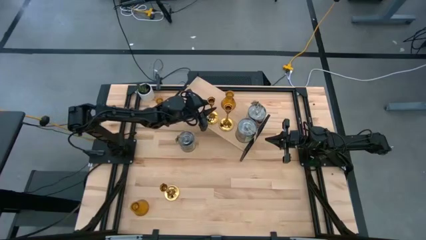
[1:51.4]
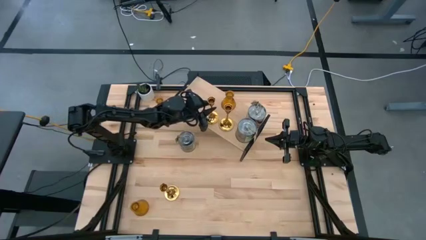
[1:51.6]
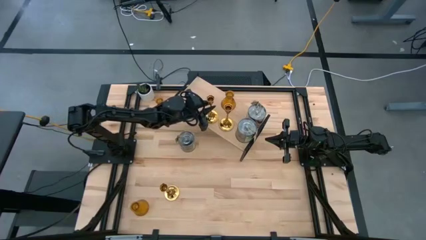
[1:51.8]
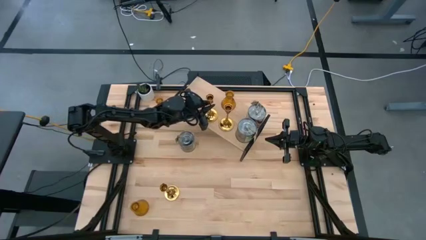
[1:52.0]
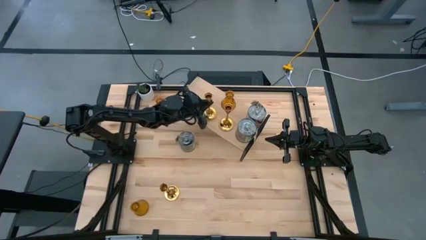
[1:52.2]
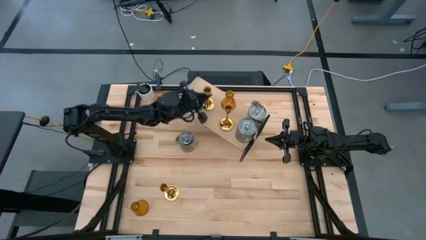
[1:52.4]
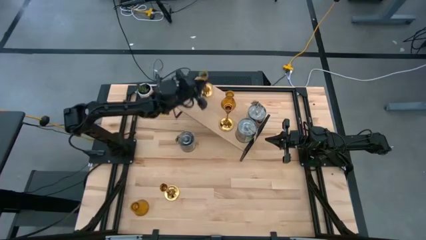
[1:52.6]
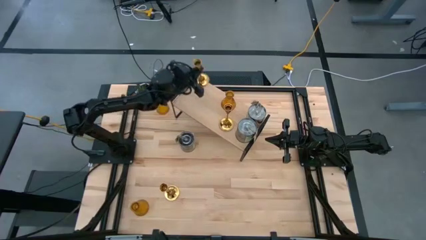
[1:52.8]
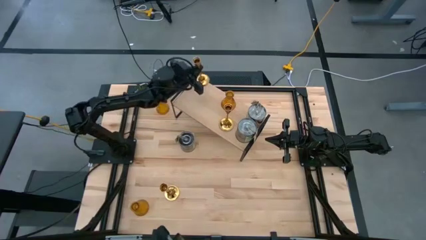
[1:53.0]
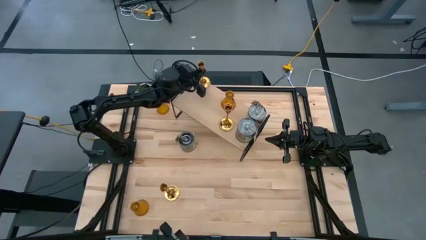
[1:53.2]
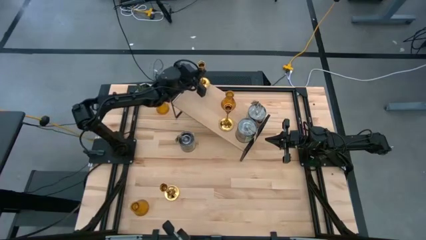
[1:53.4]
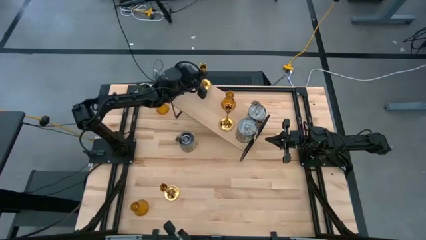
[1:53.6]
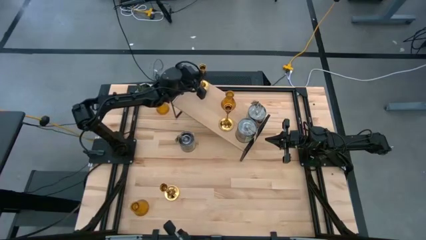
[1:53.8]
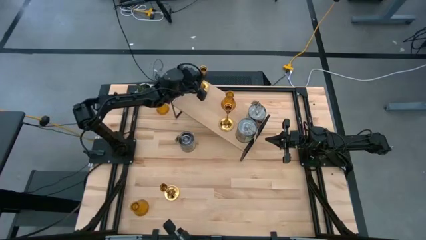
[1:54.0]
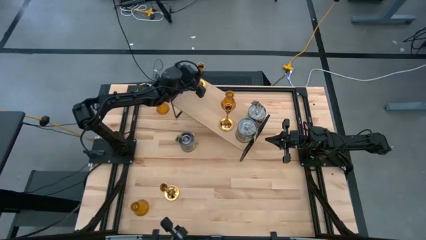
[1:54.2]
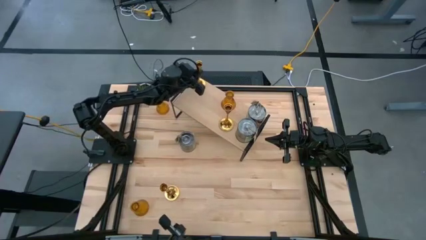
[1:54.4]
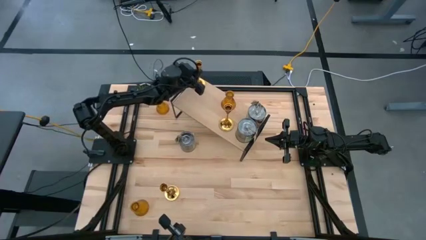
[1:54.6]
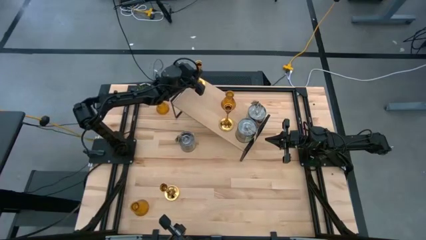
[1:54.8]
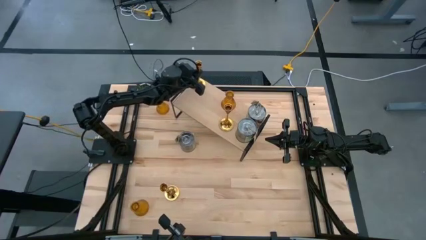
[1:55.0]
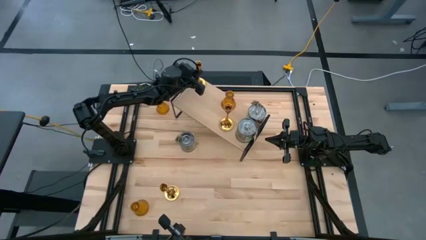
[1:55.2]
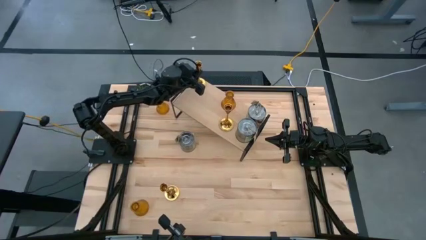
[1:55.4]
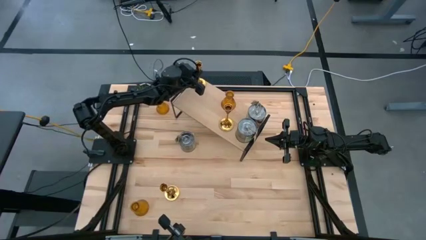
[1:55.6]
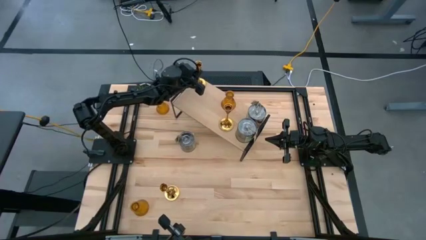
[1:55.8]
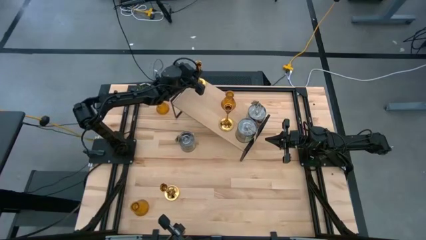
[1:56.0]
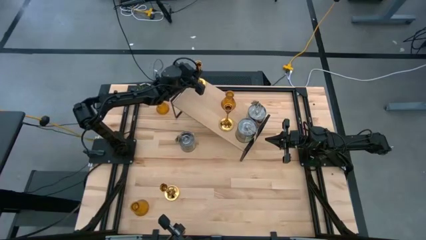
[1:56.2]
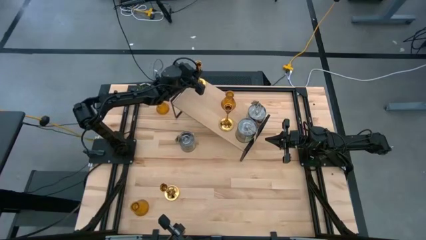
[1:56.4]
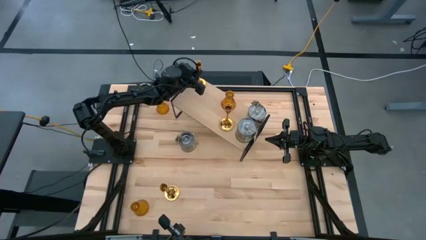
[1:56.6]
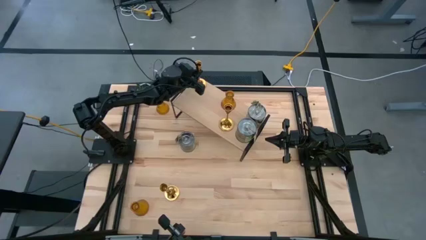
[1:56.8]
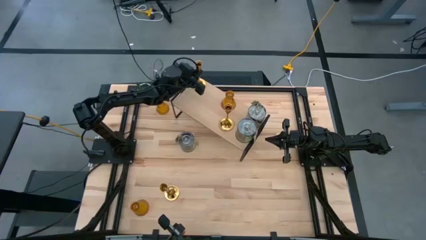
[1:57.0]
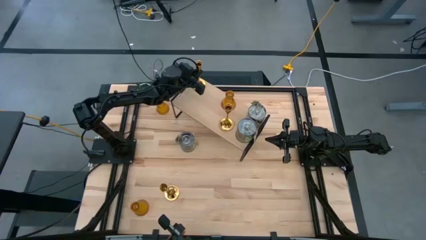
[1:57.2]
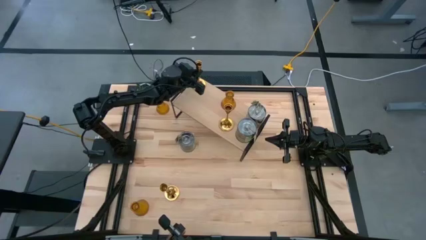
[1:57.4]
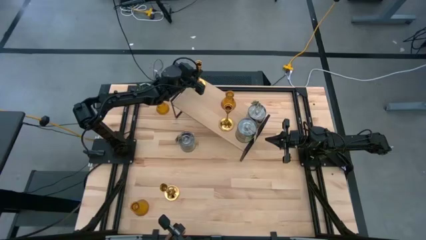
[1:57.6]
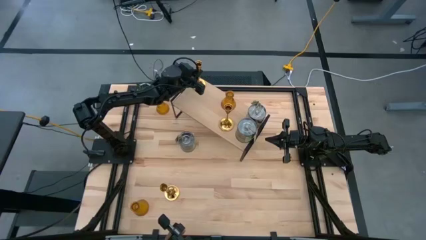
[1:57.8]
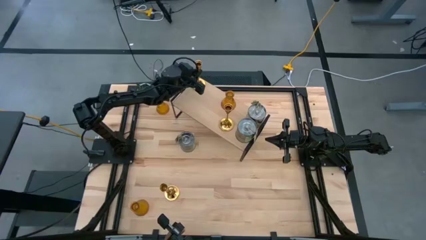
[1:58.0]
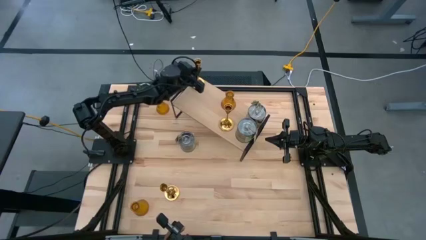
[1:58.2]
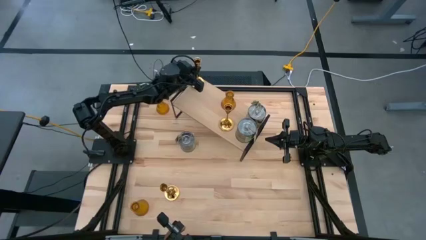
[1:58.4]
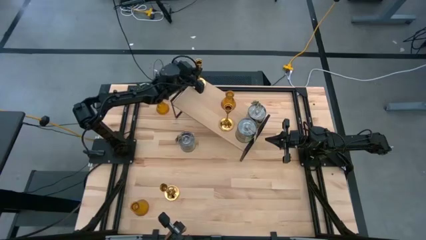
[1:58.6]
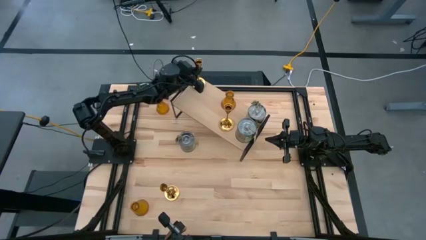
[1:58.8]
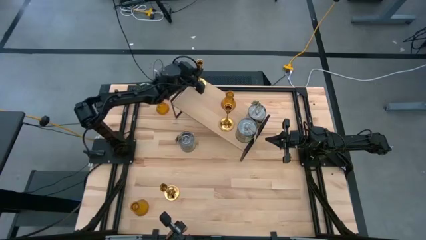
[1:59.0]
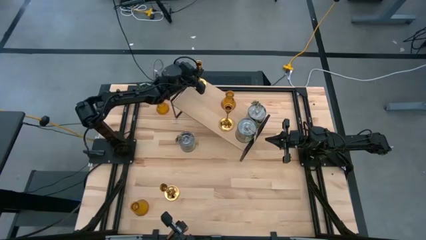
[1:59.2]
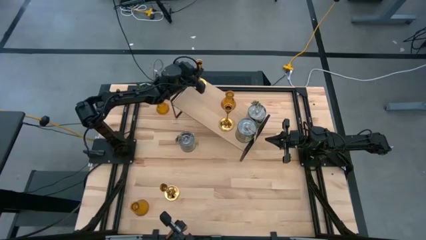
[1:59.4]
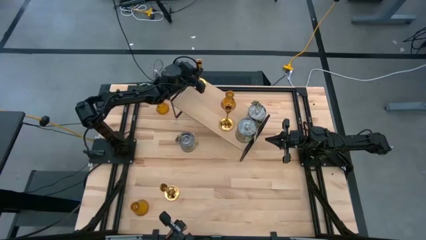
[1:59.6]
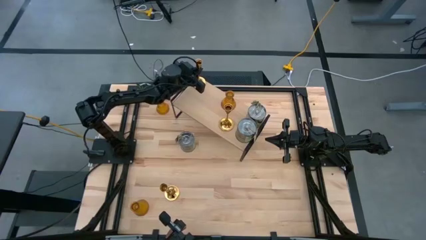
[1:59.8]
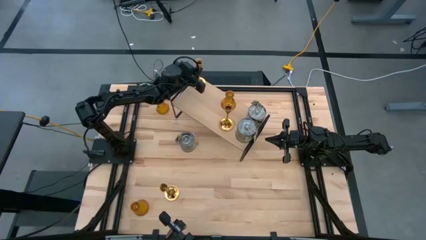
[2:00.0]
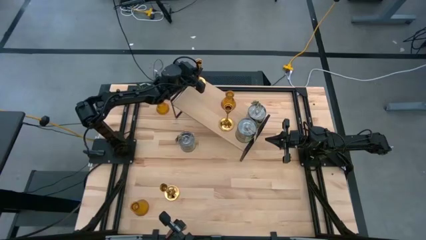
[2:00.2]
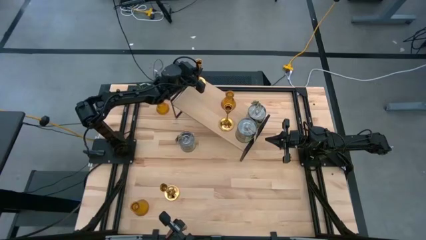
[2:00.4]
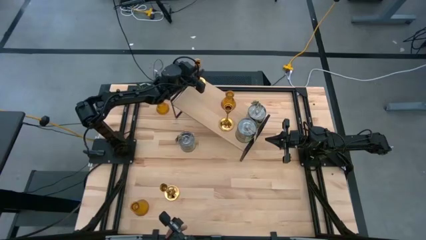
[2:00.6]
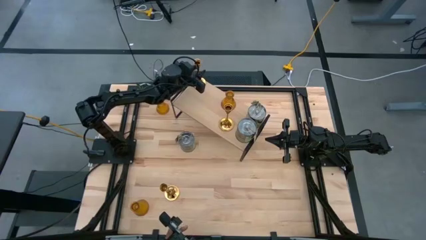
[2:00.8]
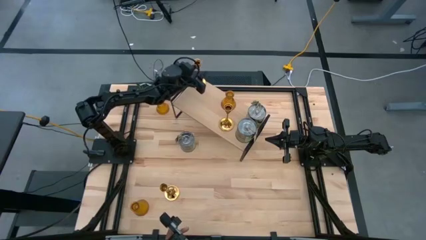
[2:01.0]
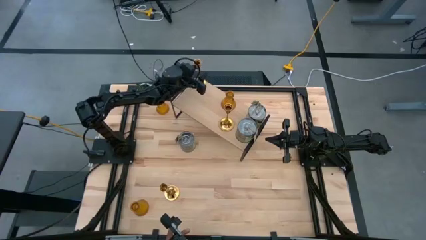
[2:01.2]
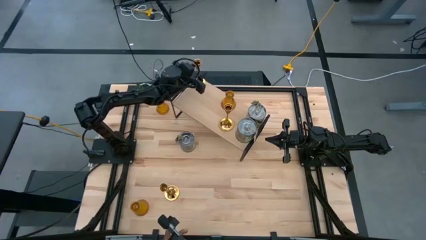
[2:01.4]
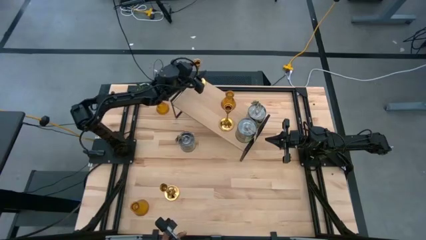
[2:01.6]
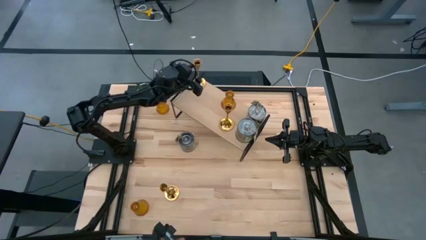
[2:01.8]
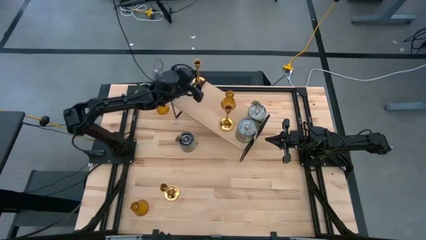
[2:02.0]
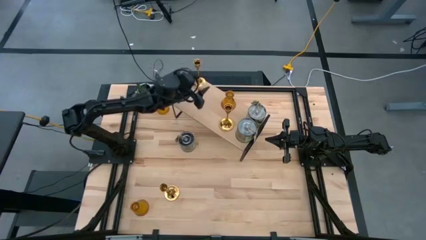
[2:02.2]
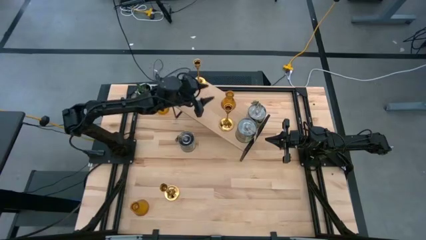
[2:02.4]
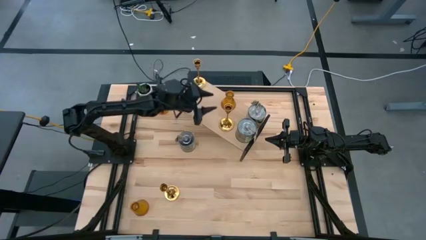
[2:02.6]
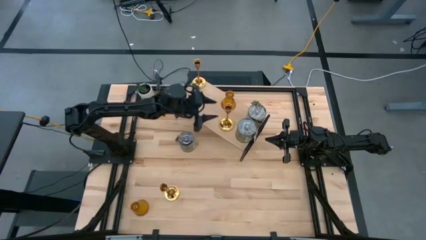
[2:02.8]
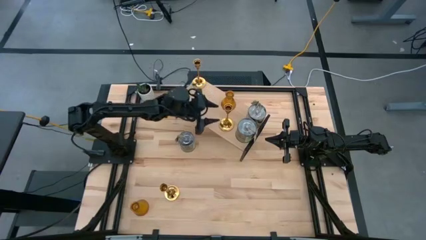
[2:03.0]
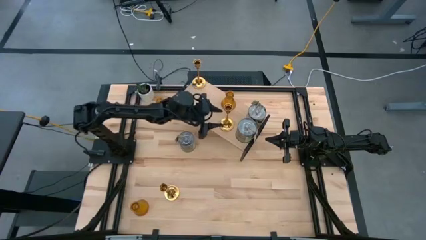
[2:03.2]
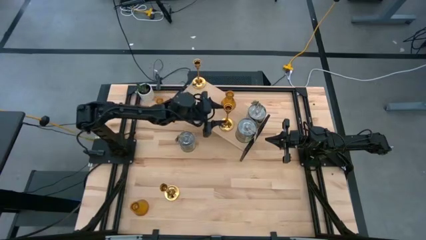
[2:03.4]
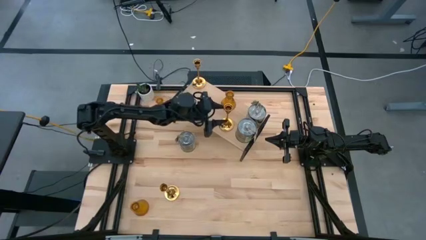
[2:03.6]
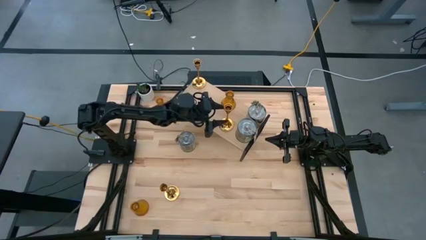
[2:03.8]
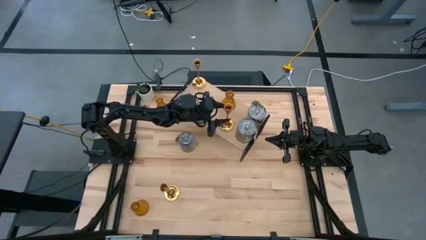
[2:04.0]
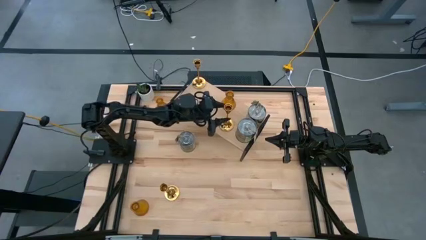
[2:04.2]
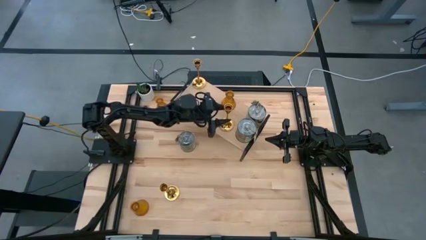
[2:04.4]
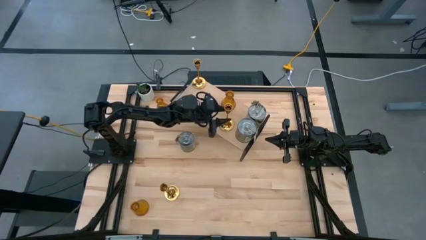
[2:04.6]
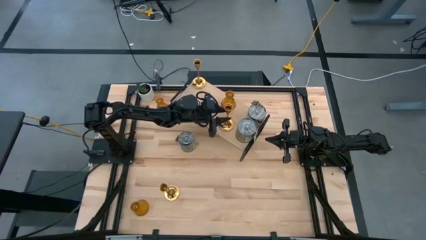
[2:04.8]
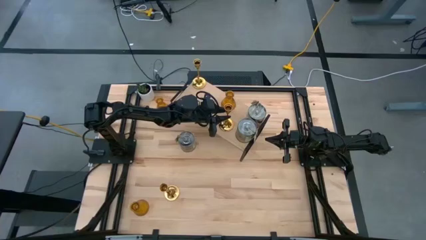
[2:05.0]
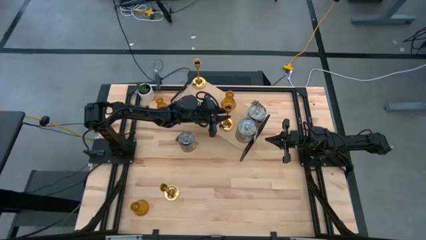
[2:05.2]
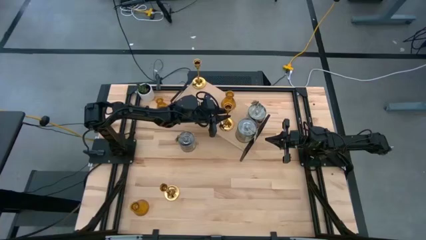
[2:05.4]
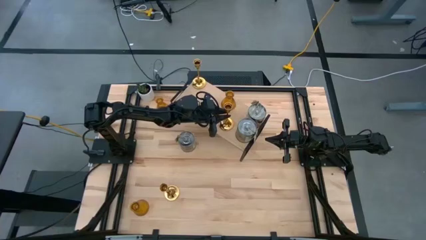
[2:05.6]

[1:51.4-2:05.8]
Task: Pick & Place candle stick holders
Adjust the gold candle holders on the shelf
